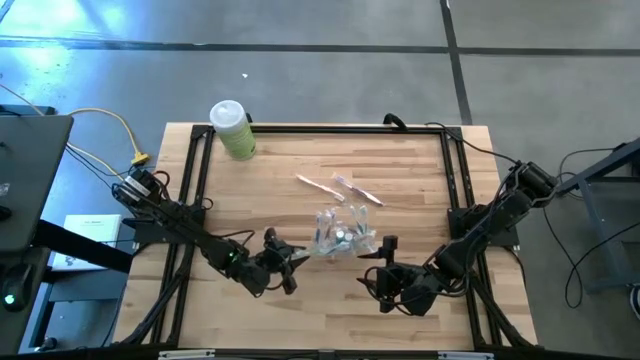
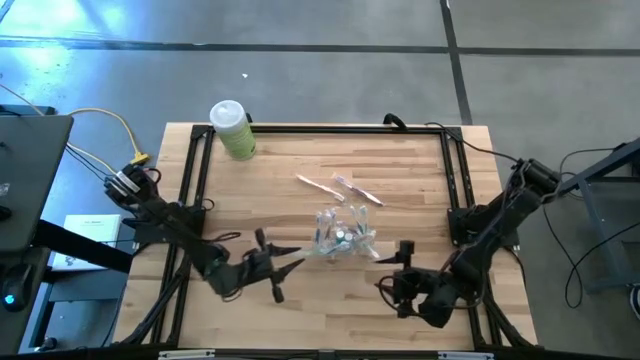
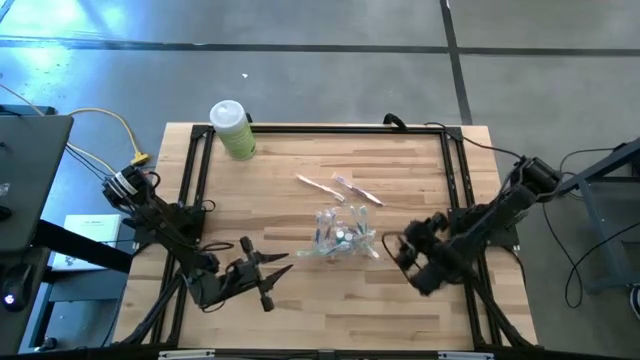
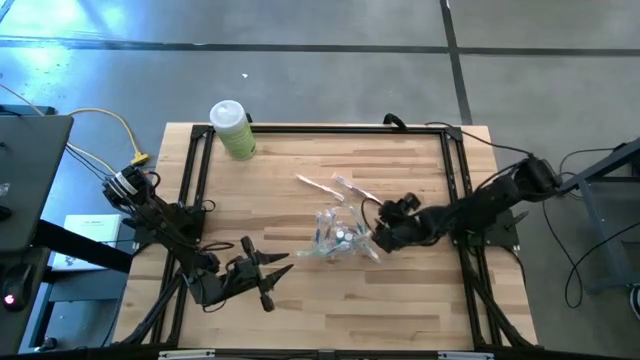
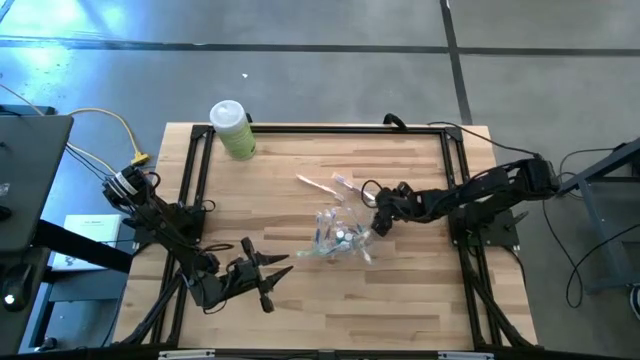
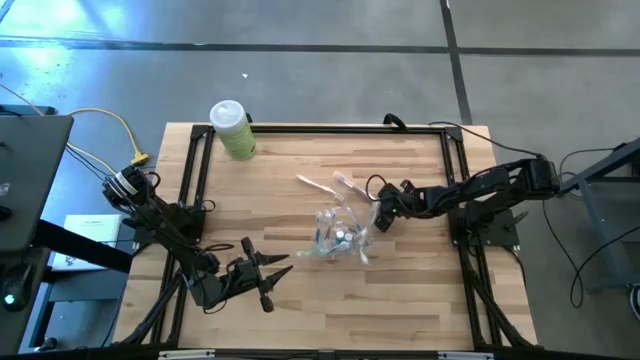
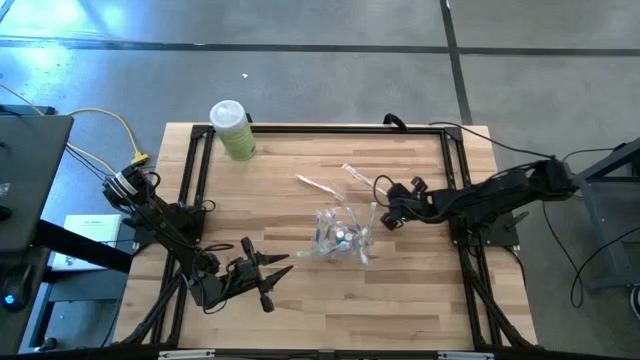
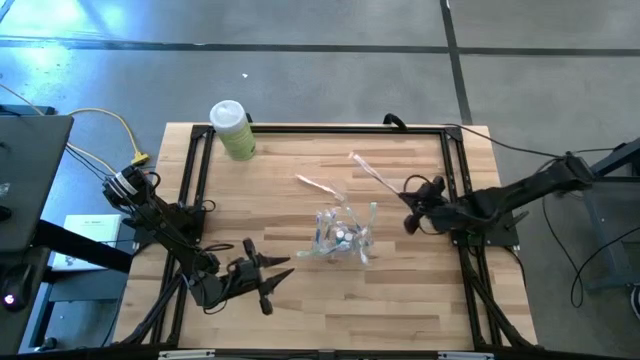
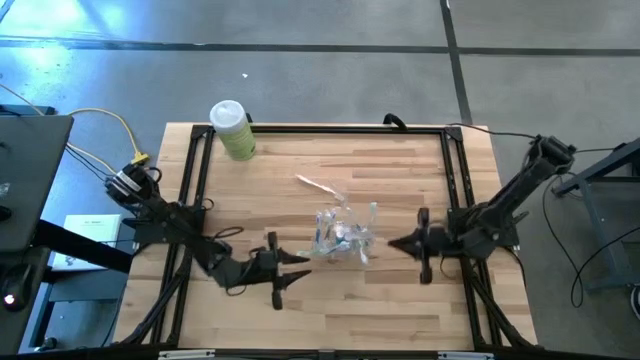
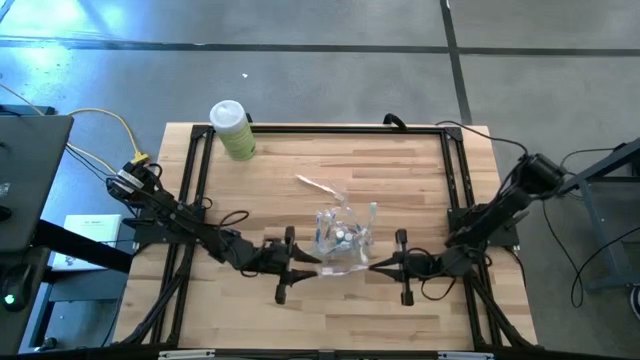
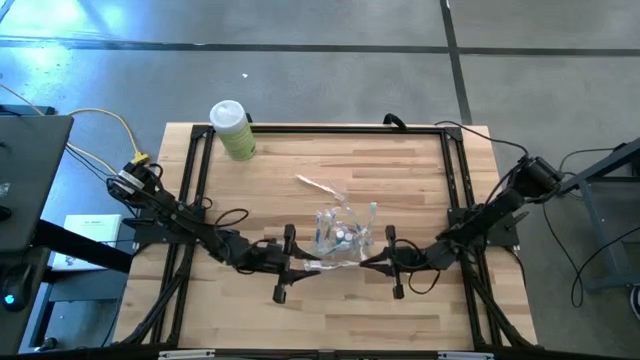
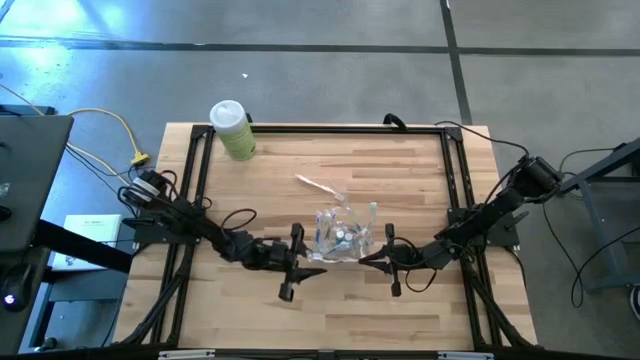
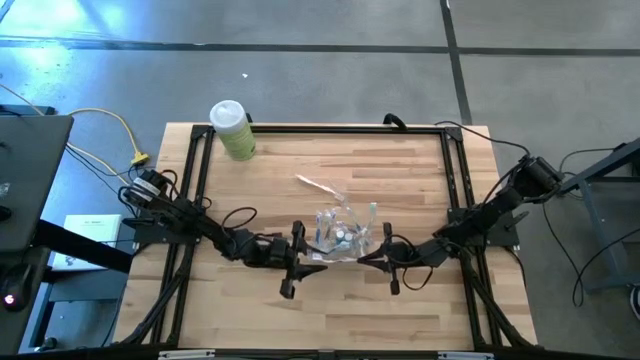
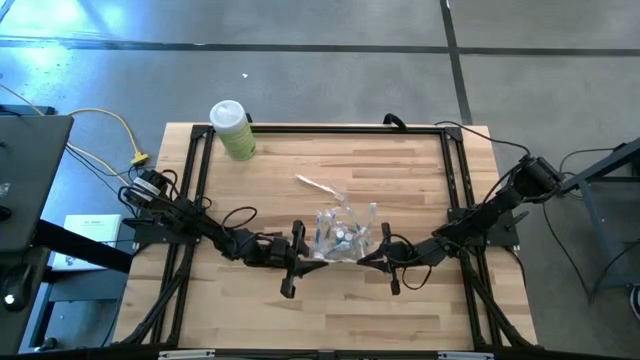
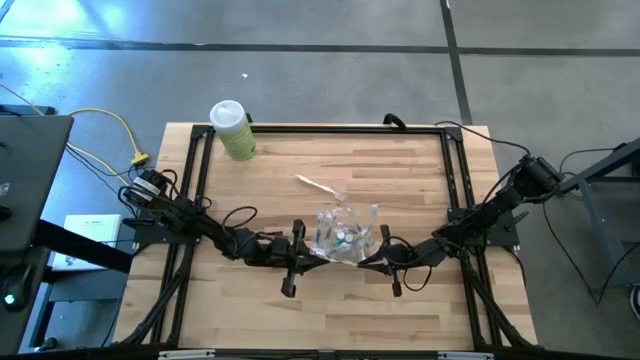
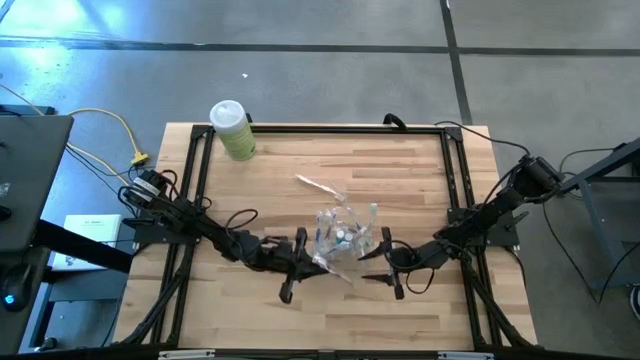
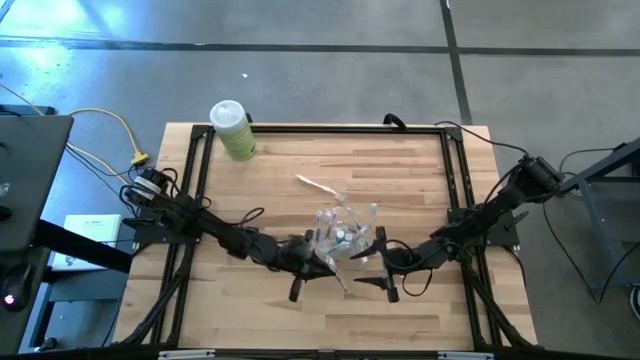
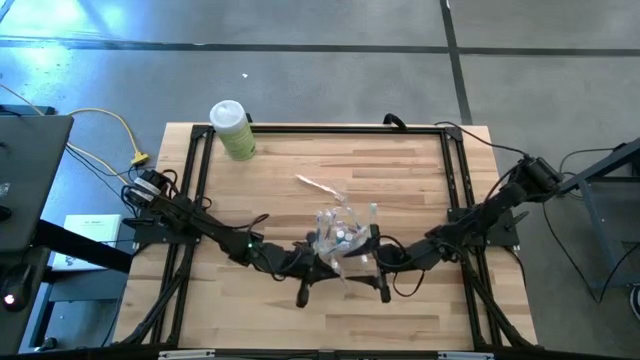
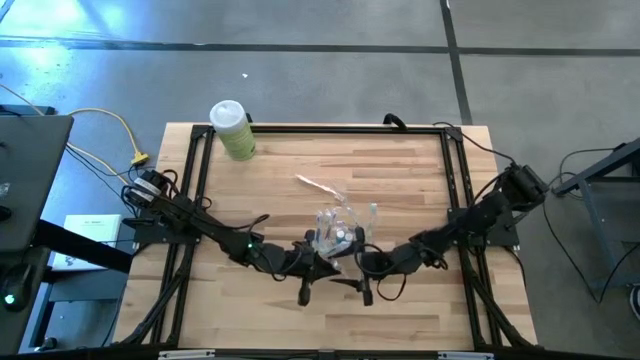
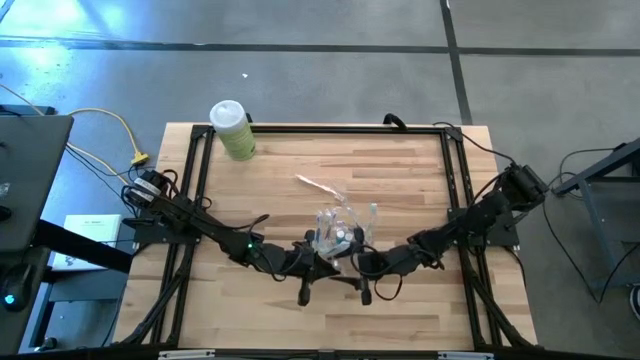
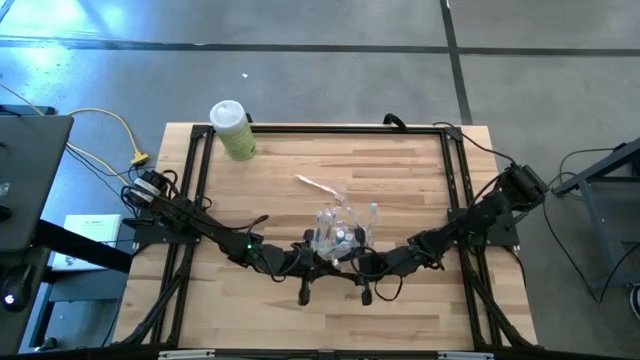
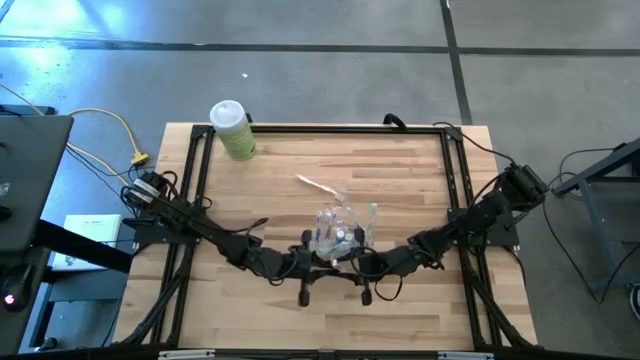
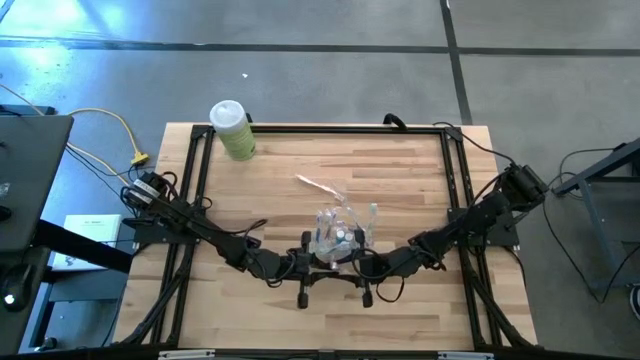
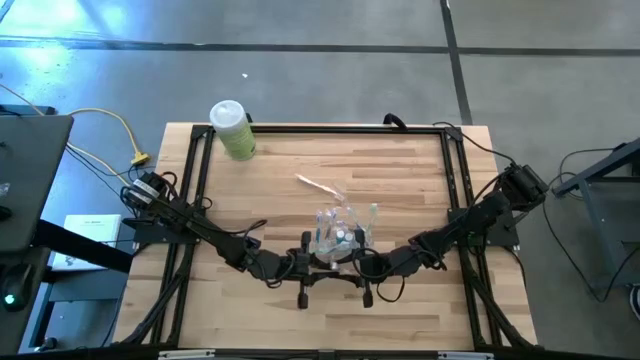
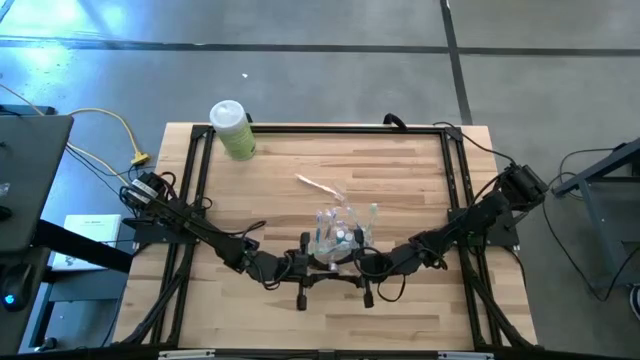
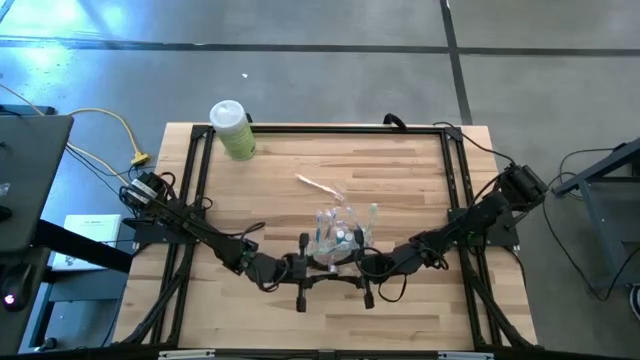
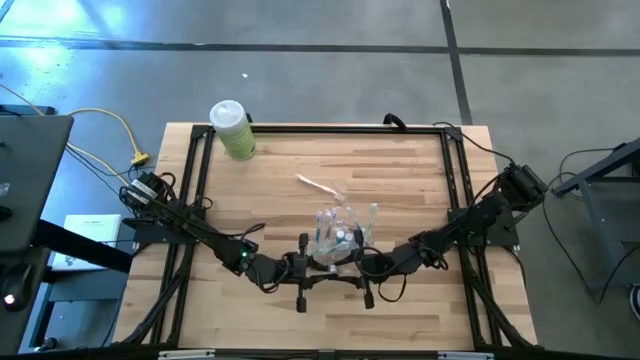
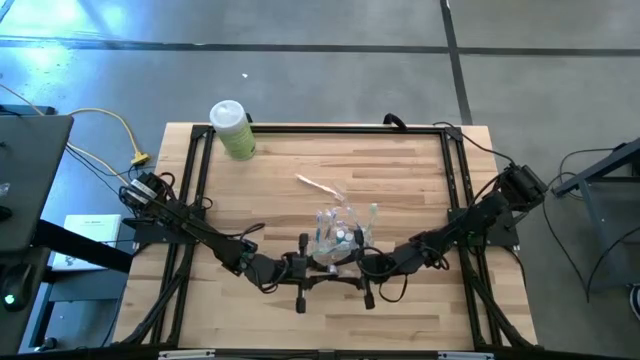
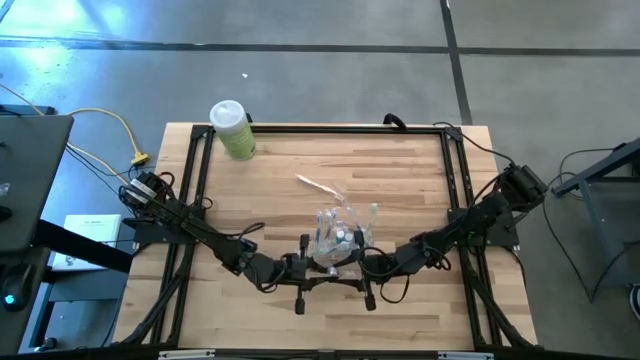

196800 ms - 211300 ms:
Task: Pick & Place toothbrushing station
Put the violet toothbrush into the transparent organizer

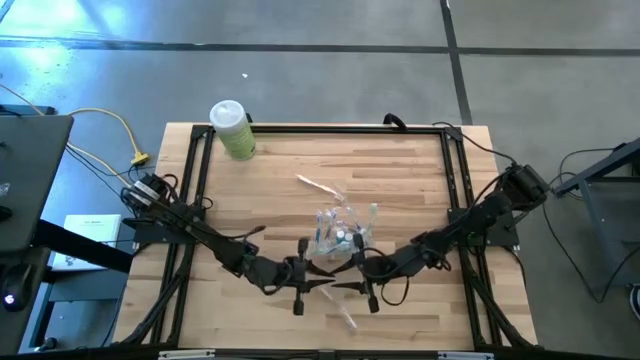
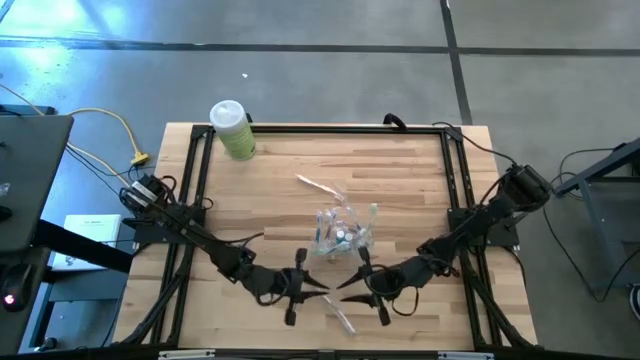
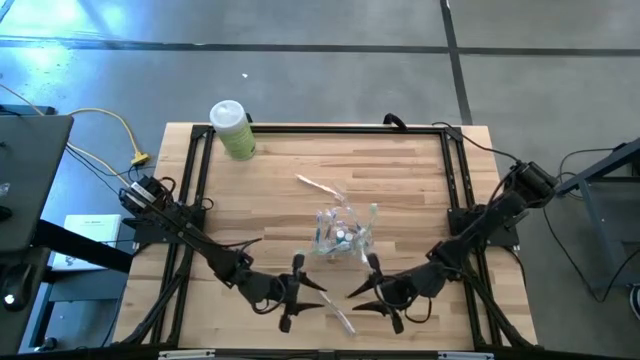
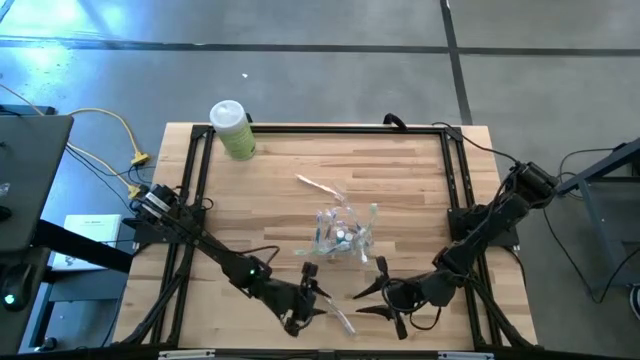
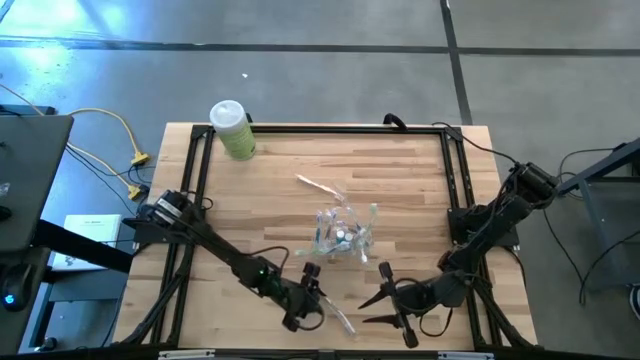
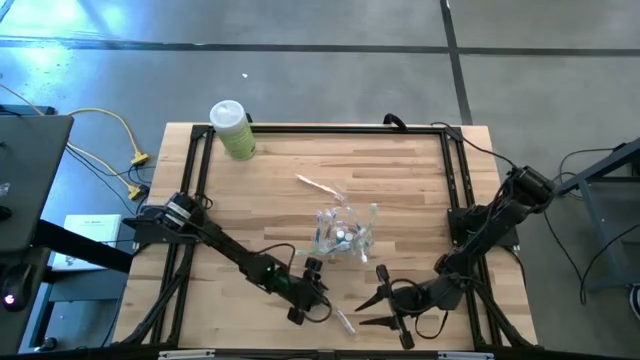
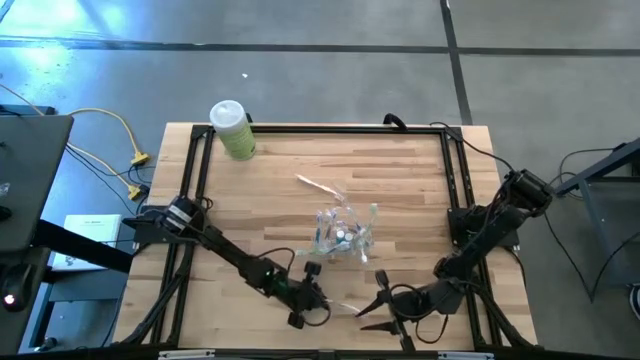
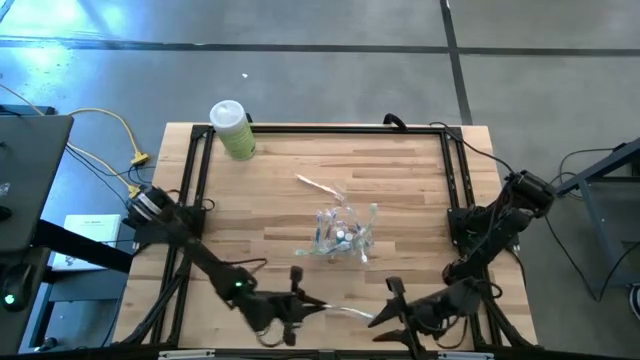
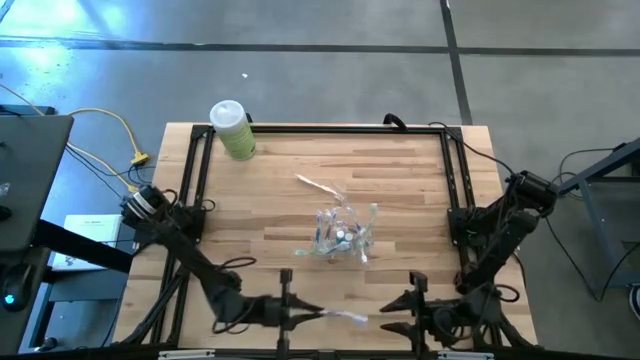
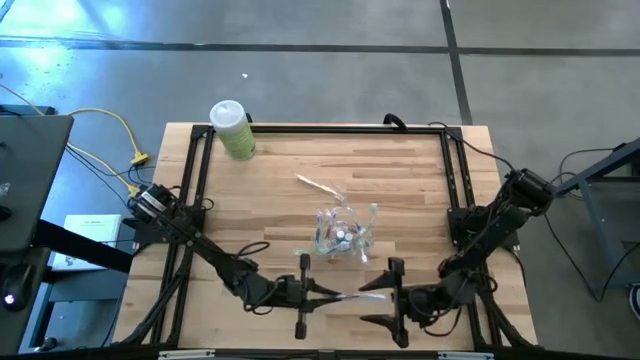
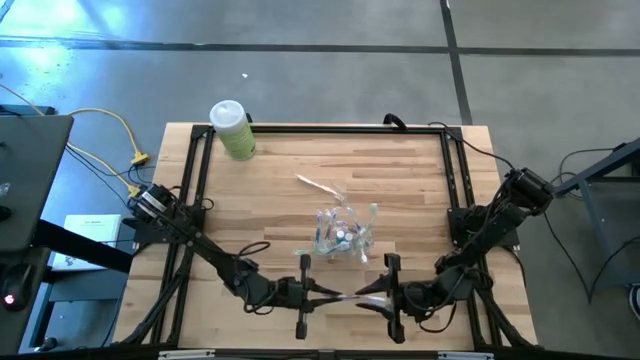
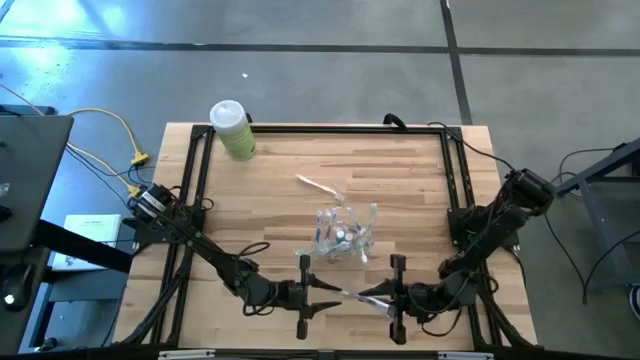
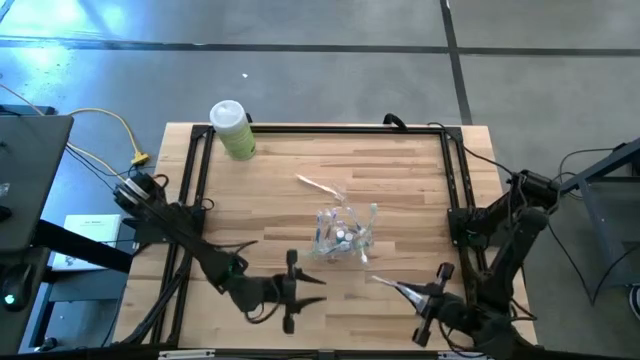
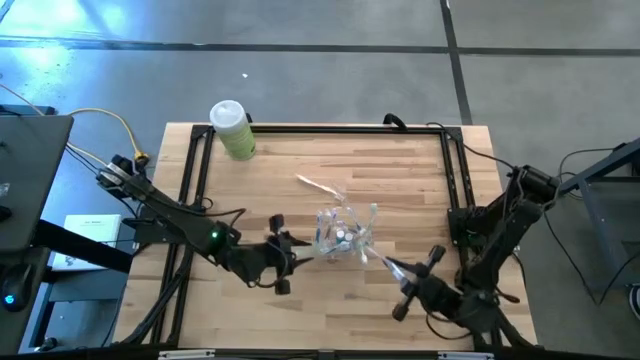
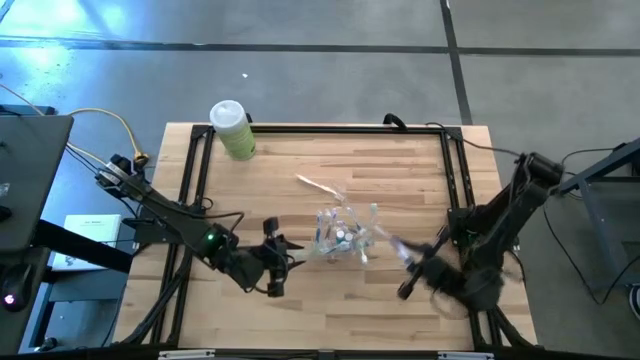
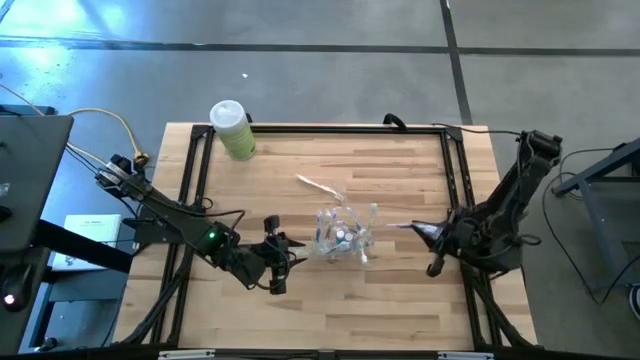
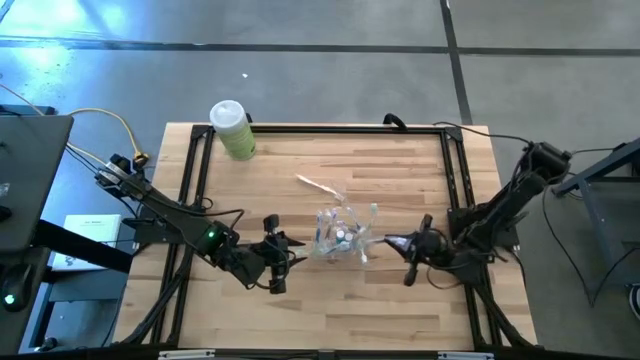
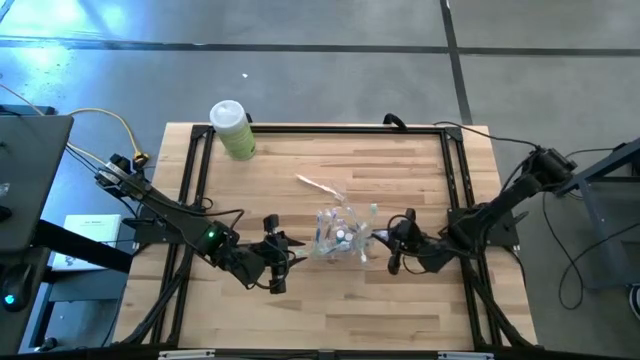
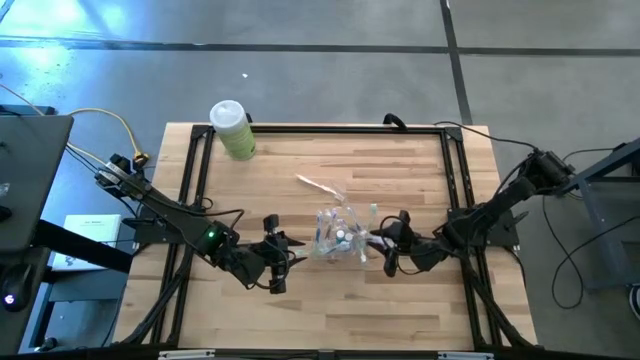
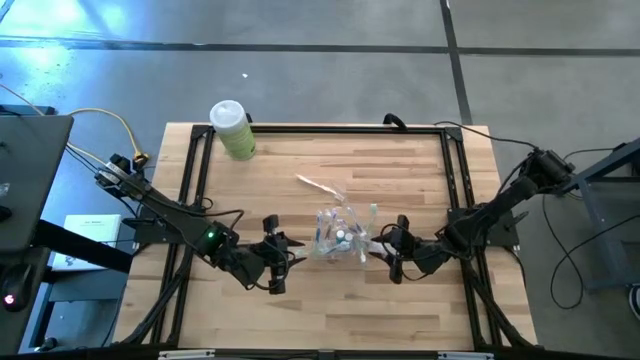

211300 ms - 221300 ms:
Put the violet toothbrush into the transparent organizer
